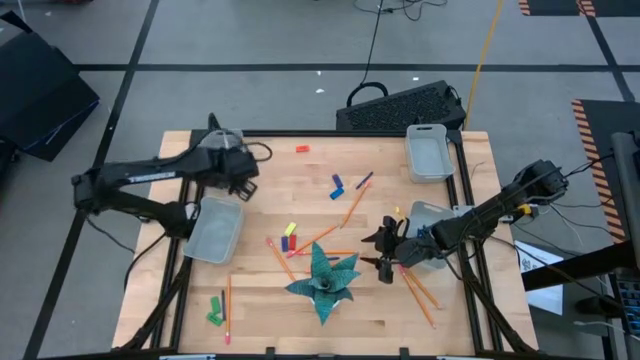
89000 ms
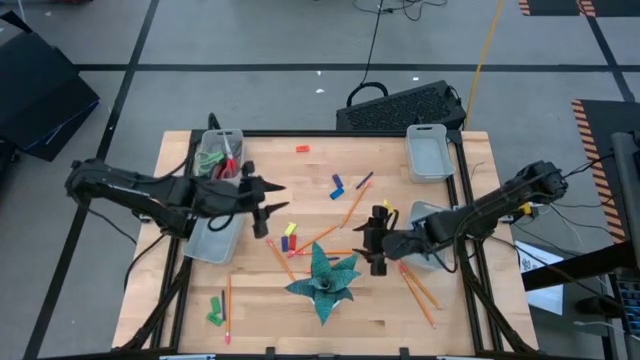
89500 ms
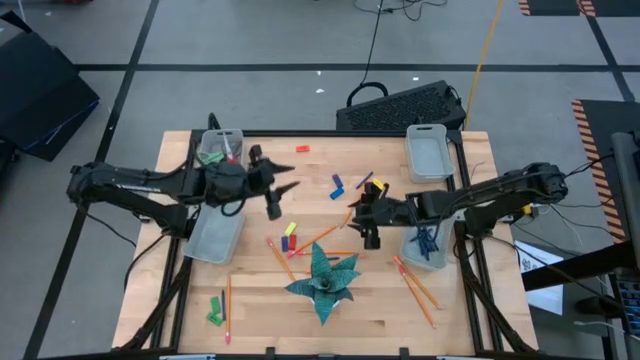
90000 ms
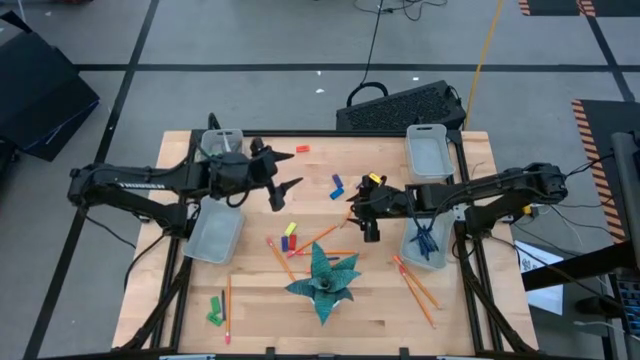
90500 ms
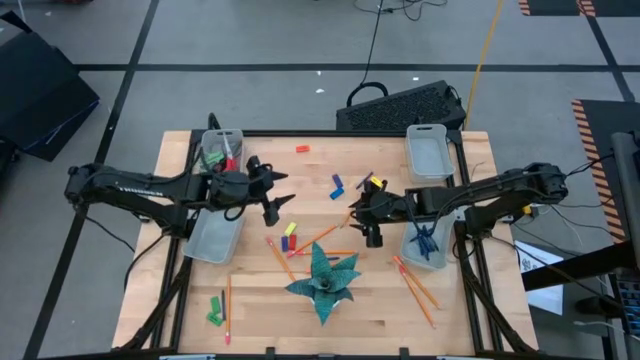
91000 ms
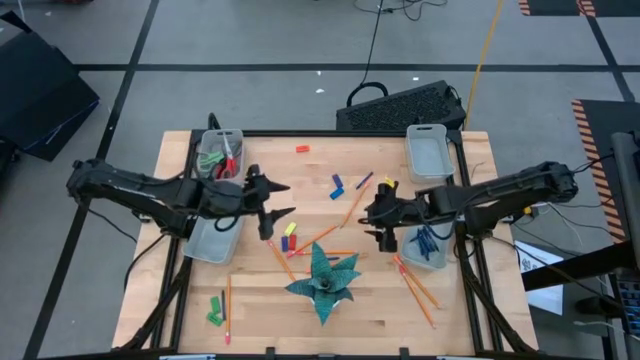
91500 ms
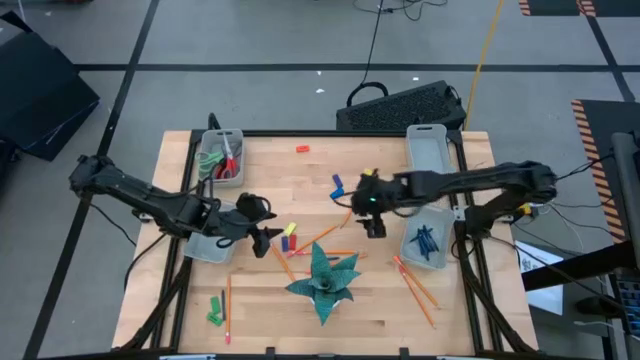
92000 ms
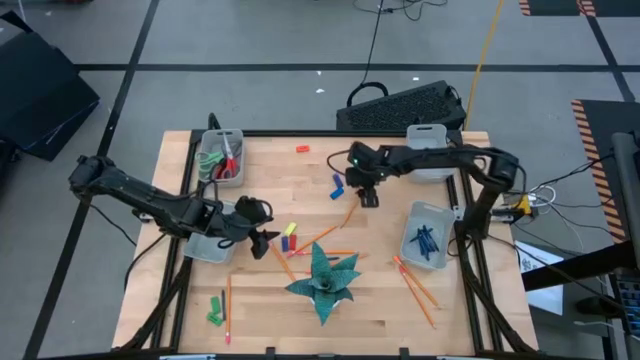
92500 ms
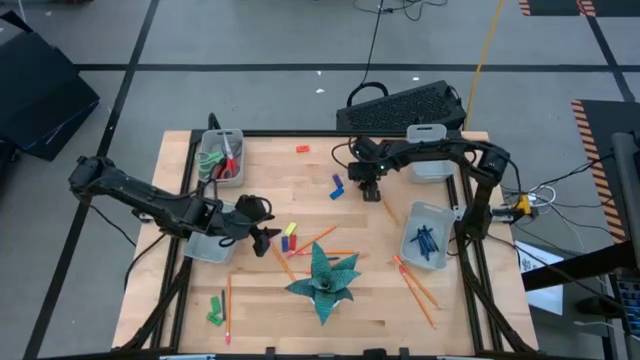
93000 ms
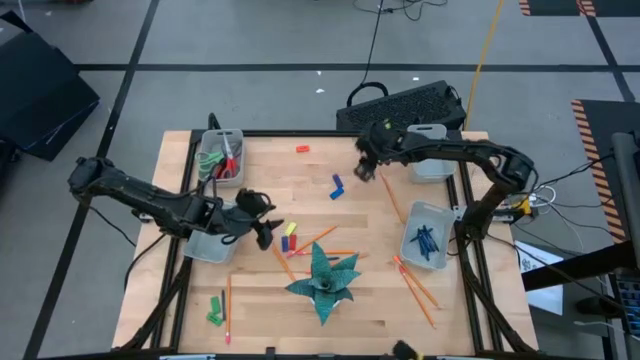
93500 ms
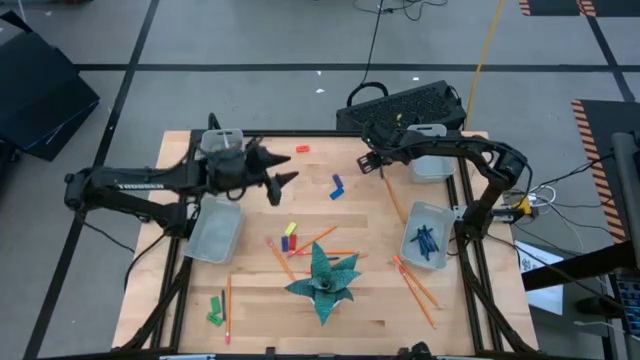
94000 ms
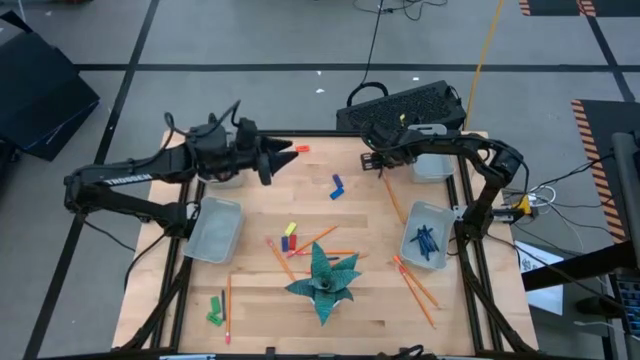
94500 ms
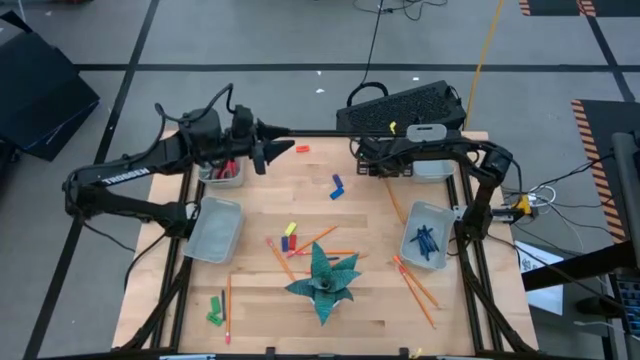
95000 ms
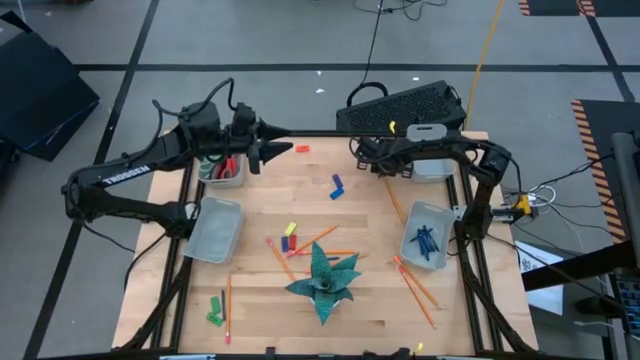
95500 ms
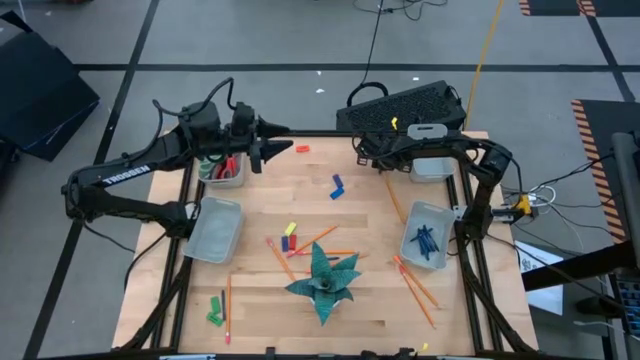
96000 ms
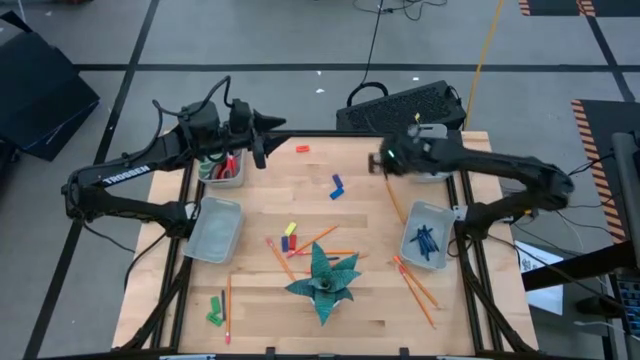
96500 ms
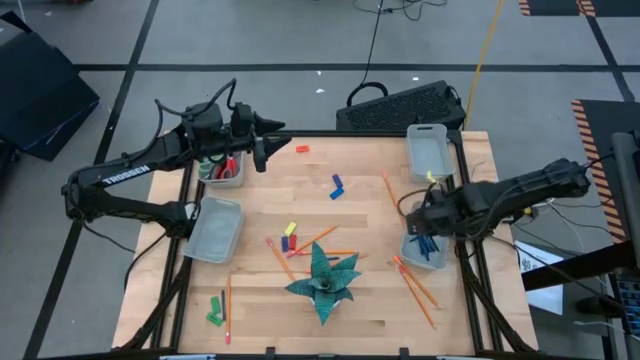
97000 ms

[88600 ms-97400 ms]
Task: Sort crayons/erasers/pens/pencils in bins
Put the top blue crayon into the bottom right gray bin

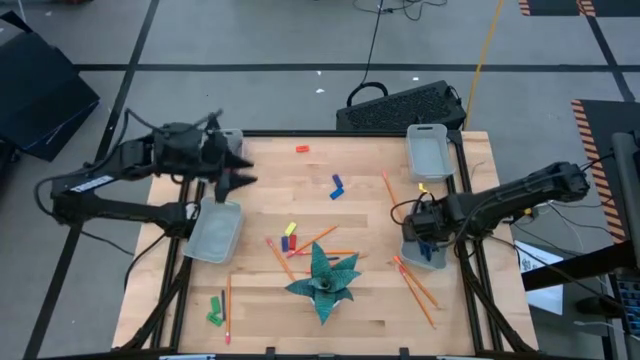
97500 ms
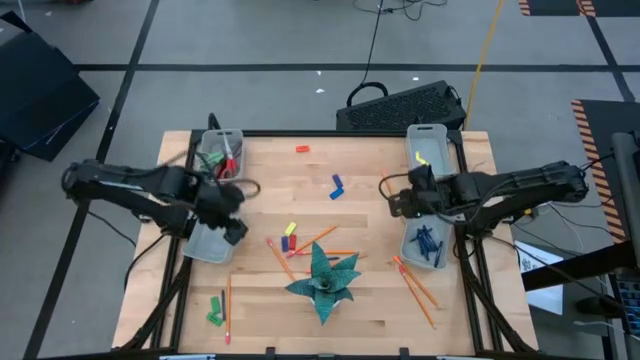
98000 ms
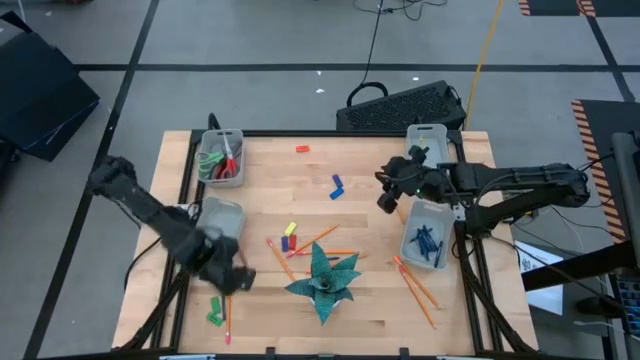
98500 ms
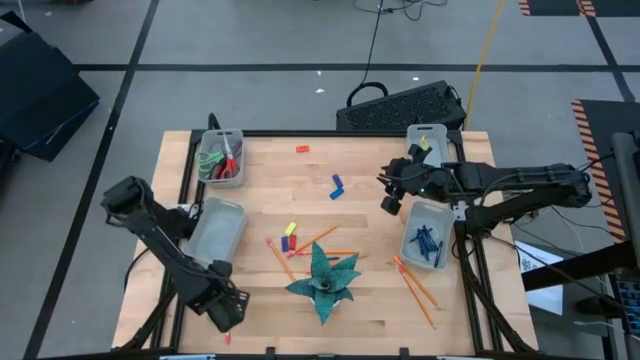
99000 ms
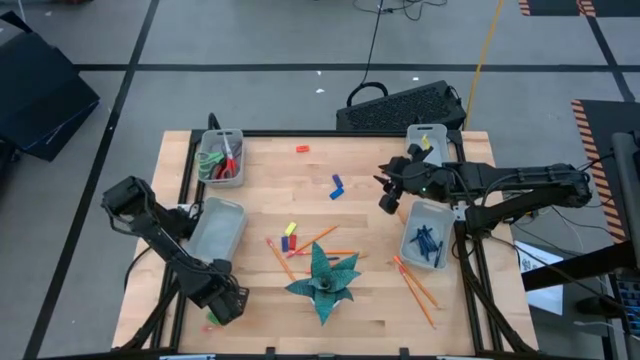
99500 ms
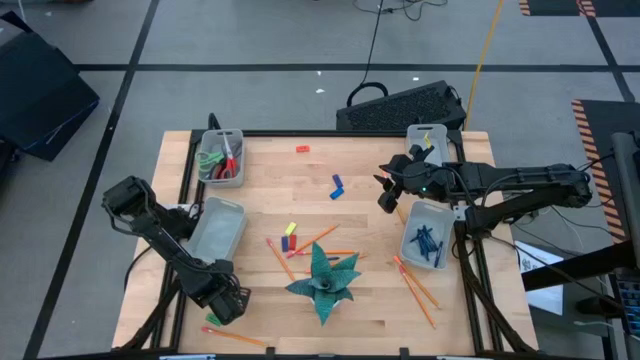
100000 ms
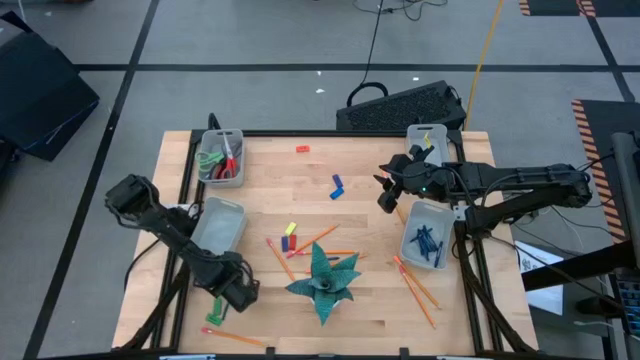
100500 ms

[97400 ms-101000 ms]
Put the bottom blue crayon into the bottom right gray bin

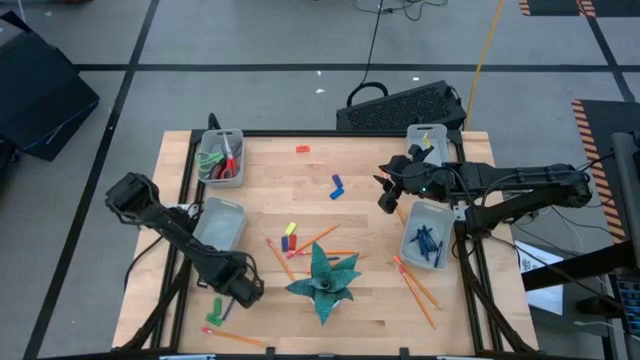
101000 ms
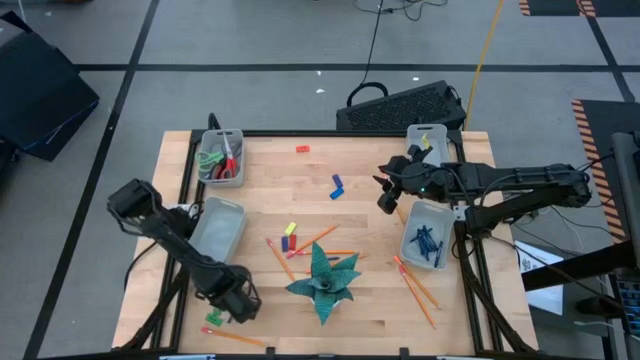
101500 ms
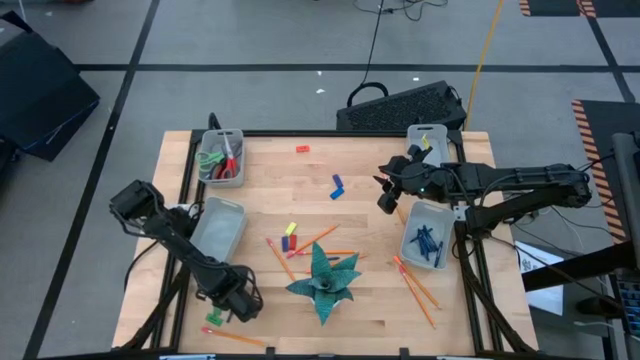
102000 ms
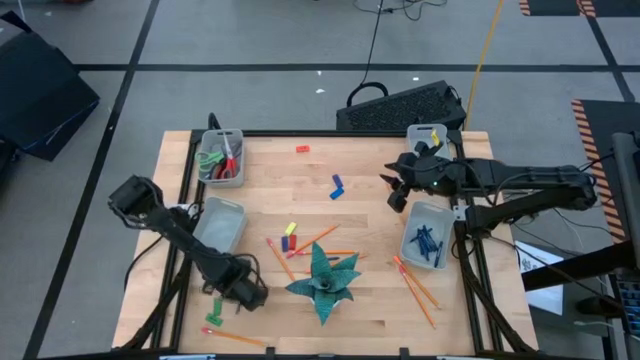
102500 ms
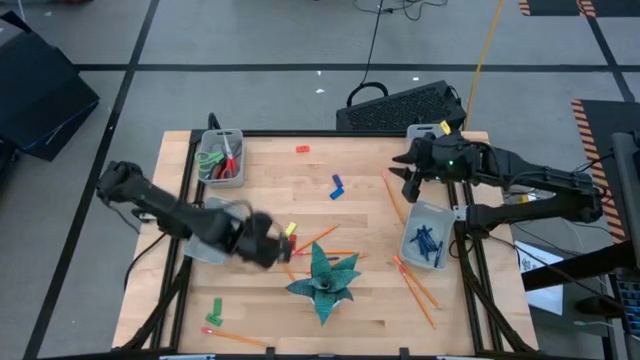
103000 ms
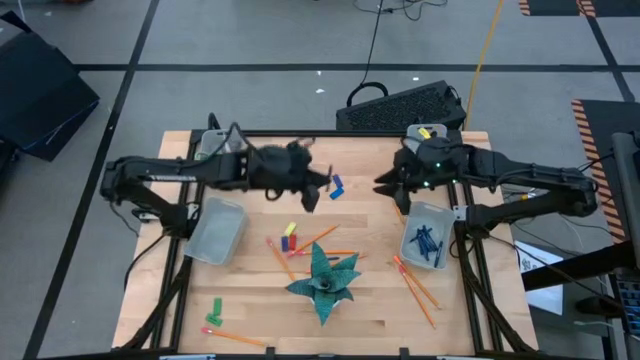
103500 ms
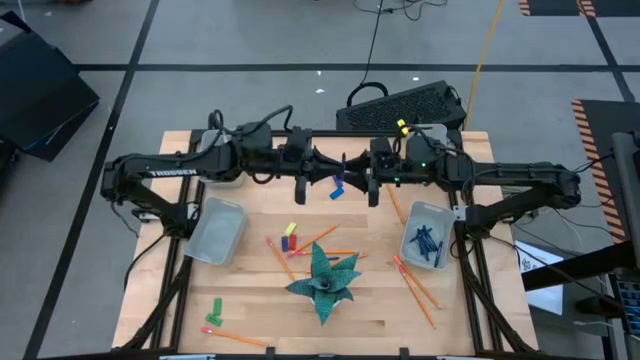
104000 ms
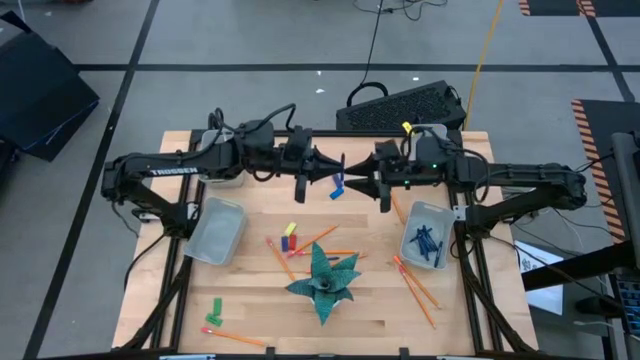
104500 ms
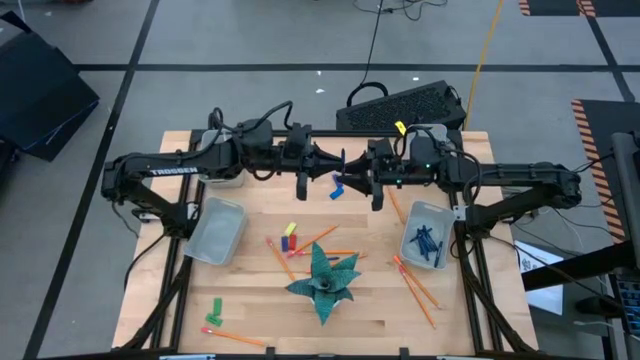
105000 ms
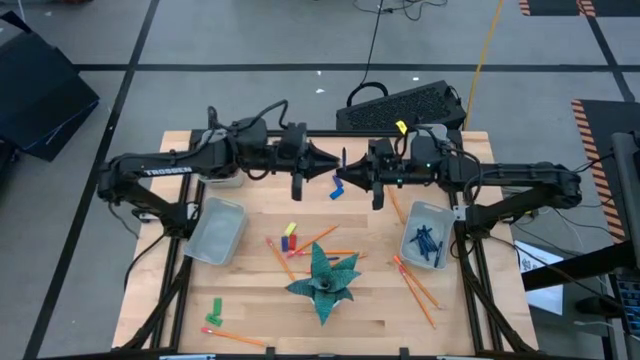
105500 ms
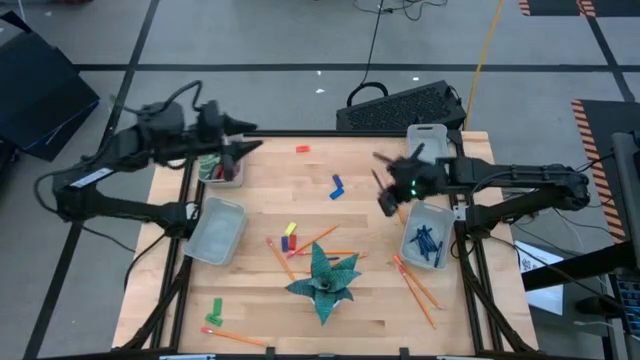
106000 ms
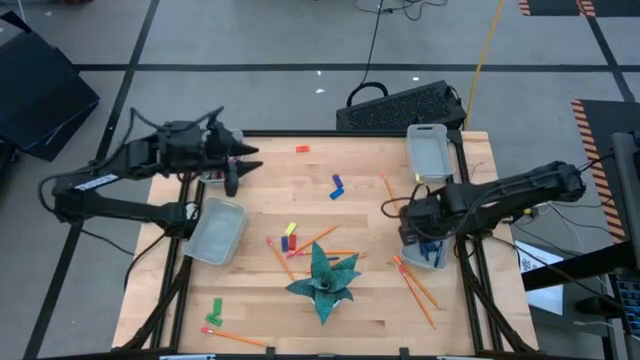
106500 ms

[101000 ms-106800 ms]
Put the bottom blue crayon into the bottom right gray bin

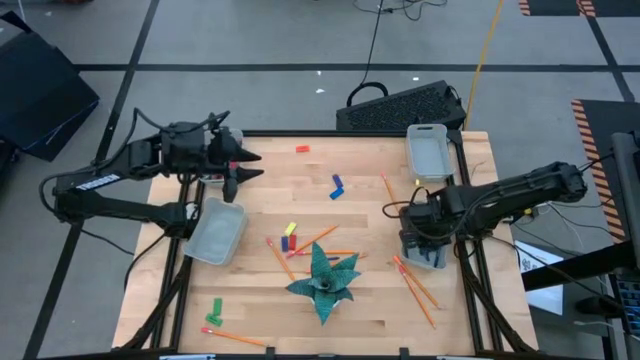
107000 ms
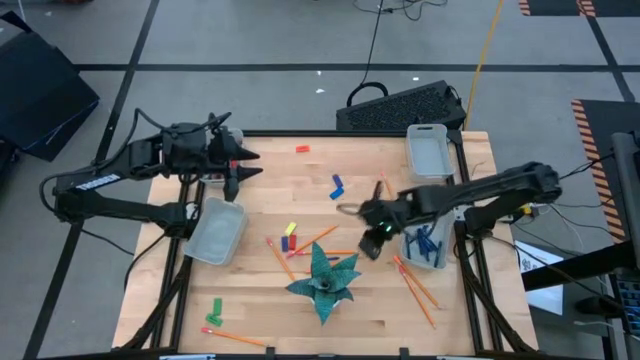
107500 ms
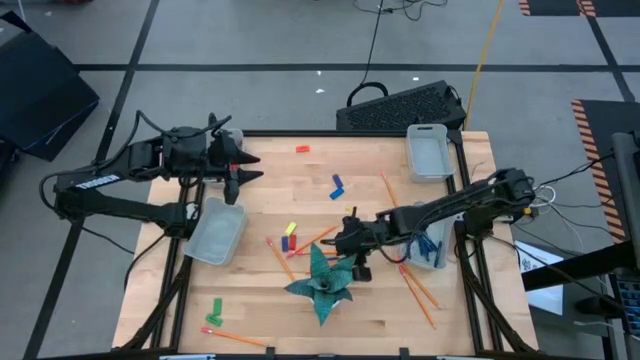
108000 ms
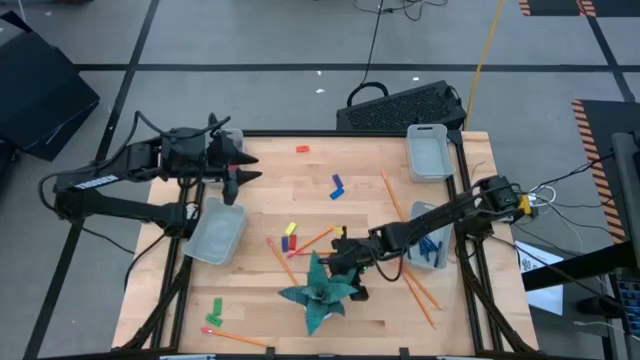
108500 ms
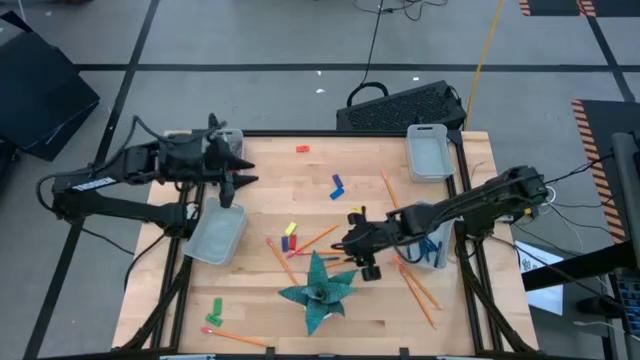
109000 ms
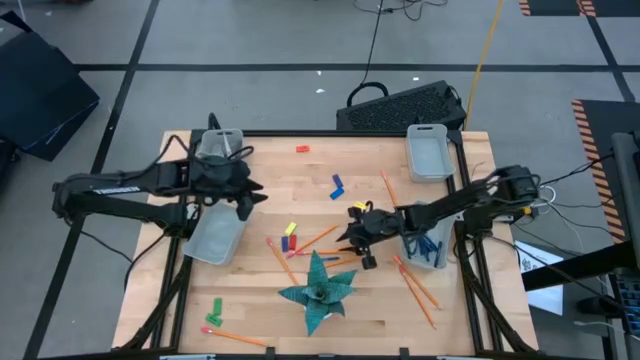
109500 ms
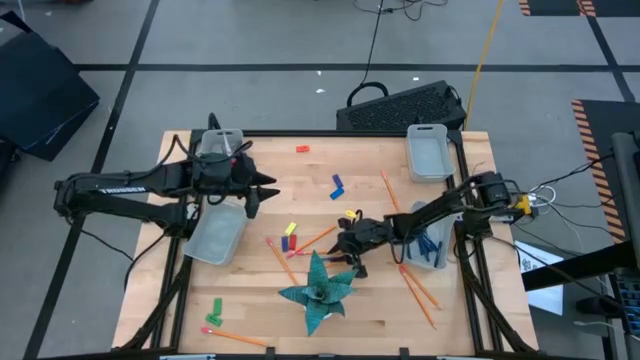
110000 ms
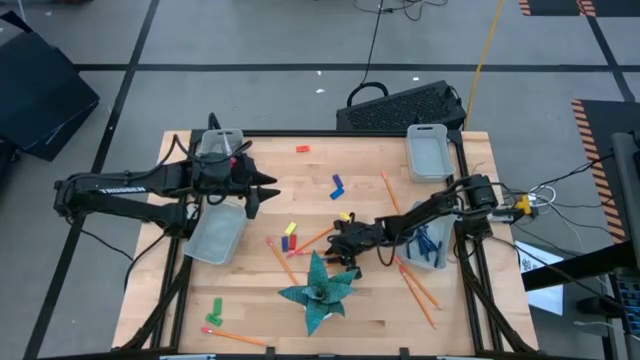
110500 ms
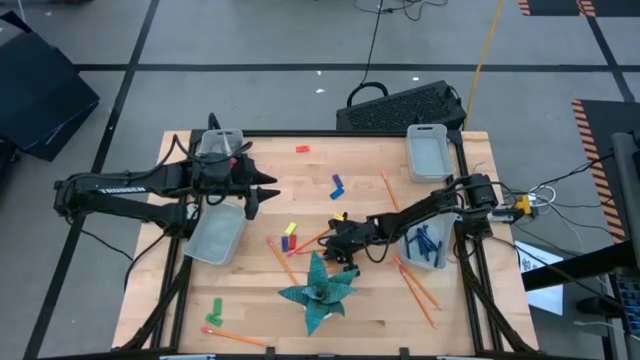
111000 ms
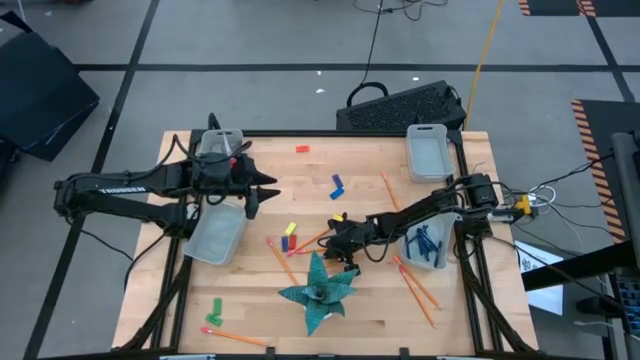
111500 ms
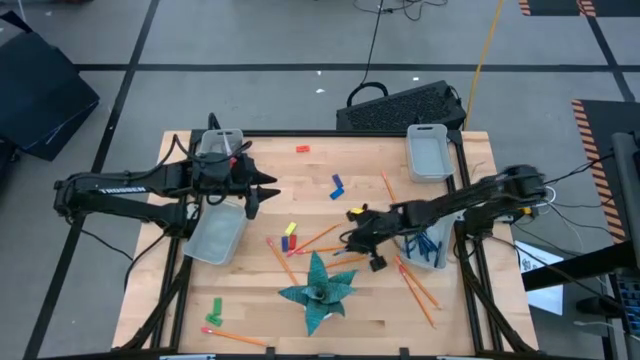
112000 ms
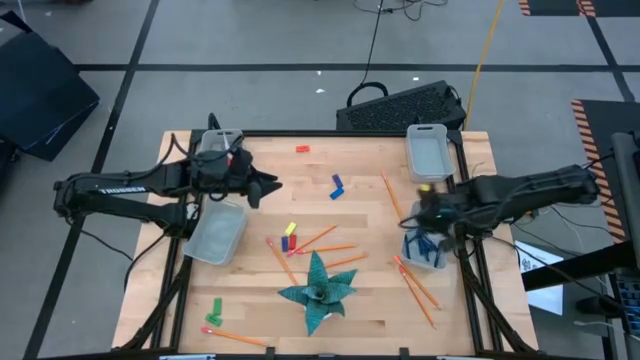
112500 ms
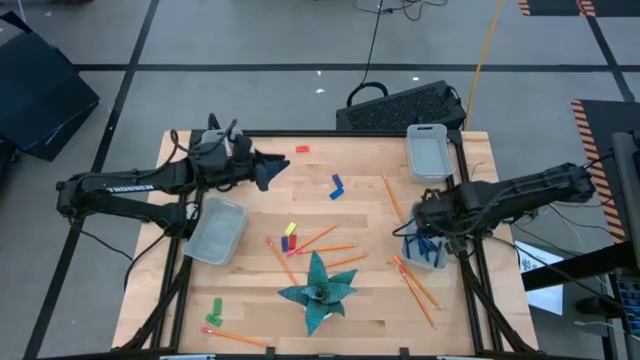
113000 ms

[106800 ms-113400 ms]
Put the blue crayon into the bottom right gray bin
